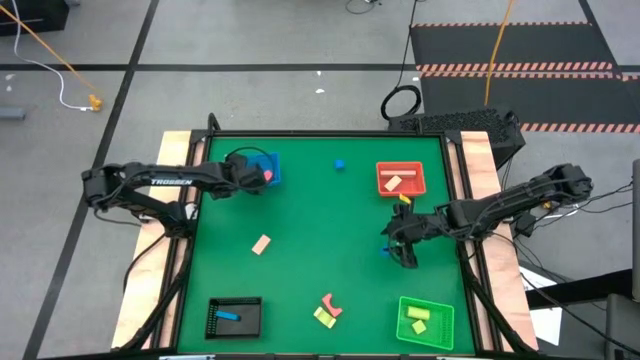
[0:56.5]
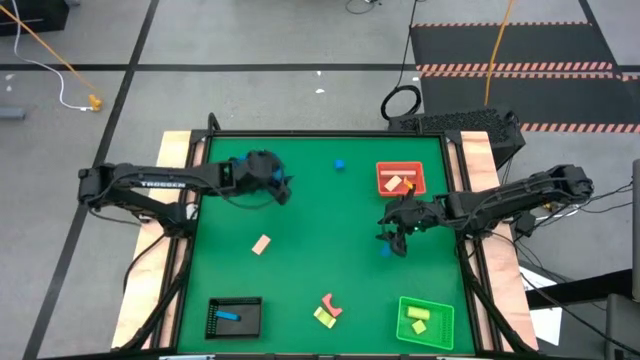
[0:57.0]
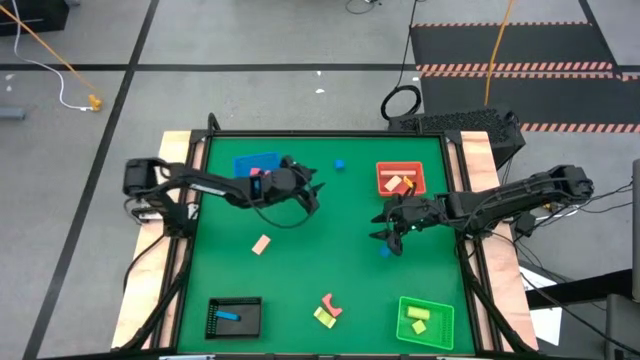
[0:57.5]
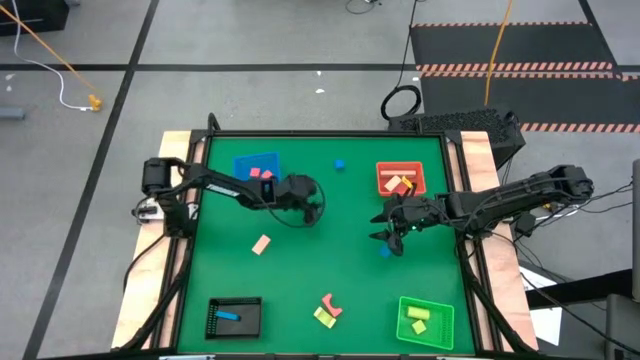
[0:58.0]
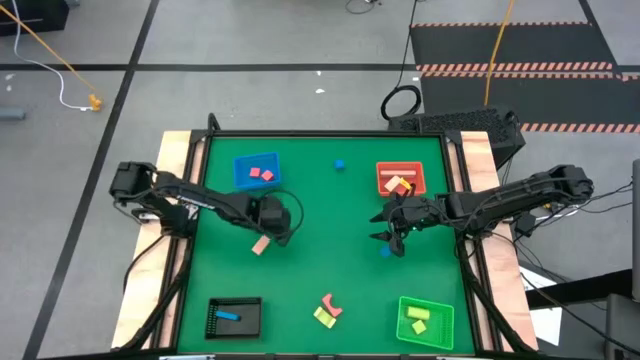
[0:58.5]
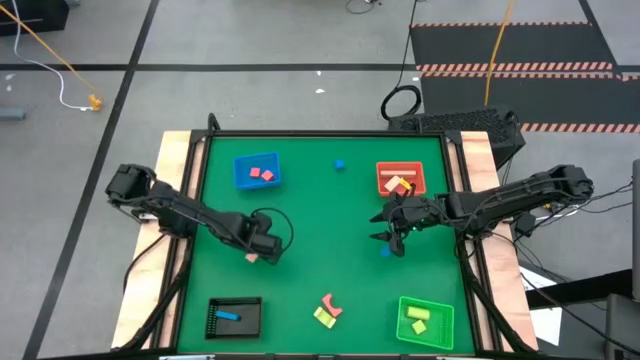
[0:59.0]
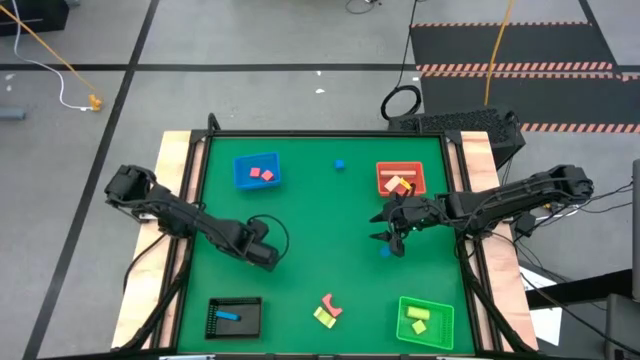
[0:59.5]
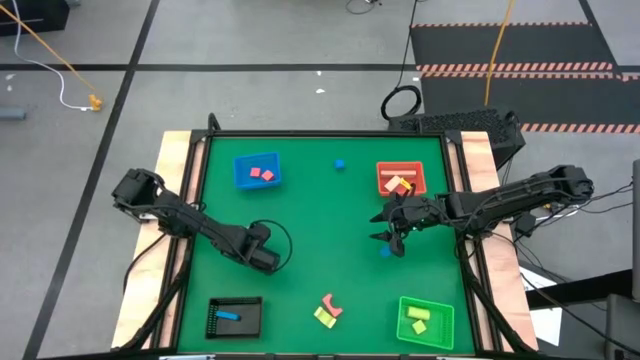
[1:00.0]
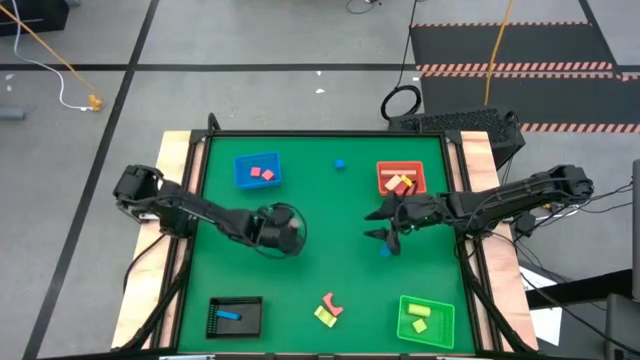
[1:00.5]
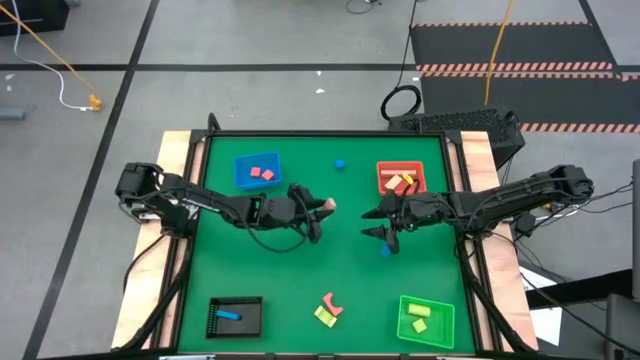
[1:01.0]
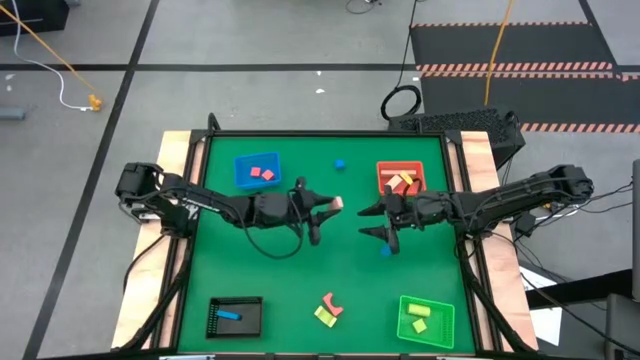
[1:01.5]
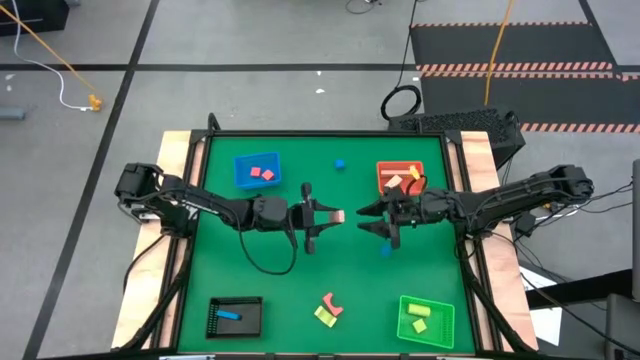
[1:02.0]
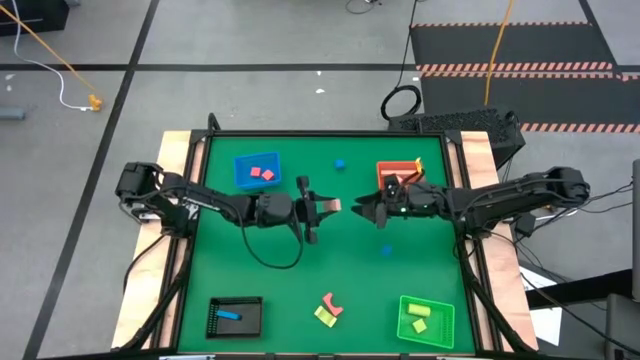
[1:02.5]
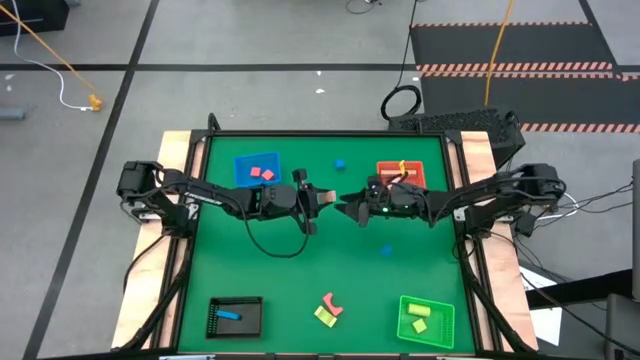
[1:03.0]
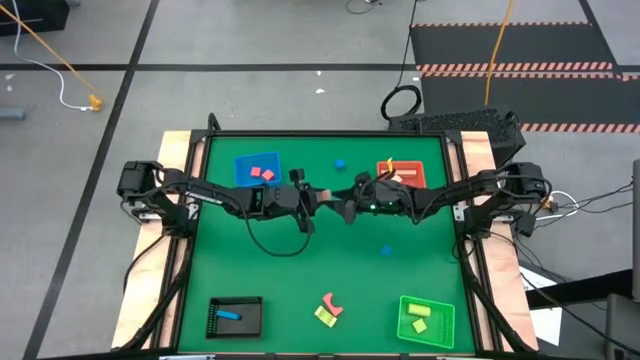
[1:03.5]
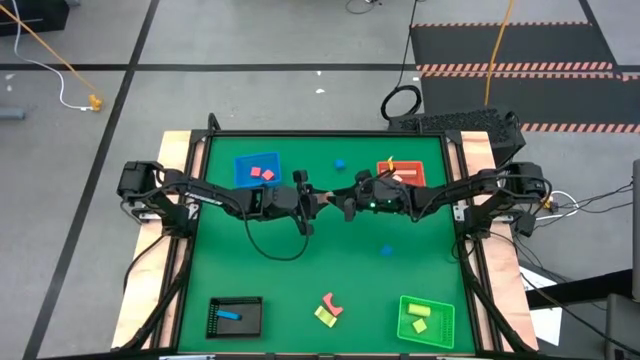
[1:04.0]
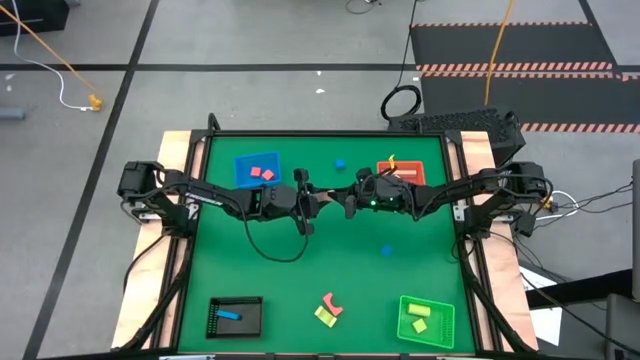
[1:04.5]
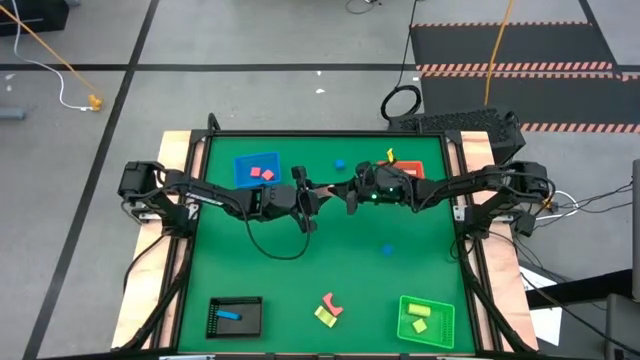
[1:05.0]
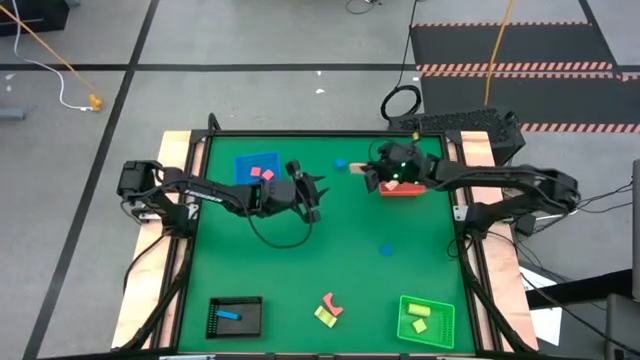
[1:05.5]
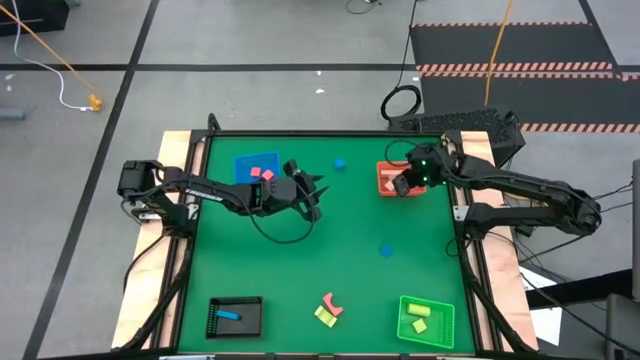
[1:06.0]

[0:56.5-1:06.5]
Task: Sort & place blocks by color
Put the brown block in the orange basket

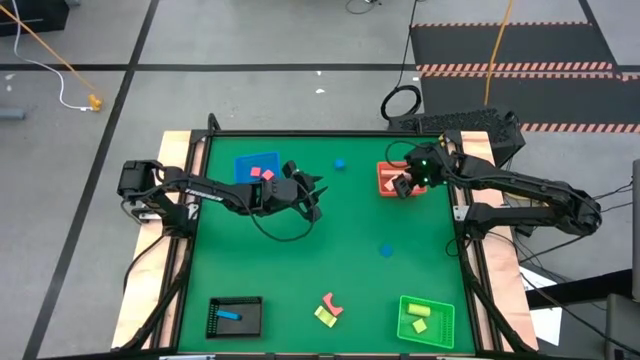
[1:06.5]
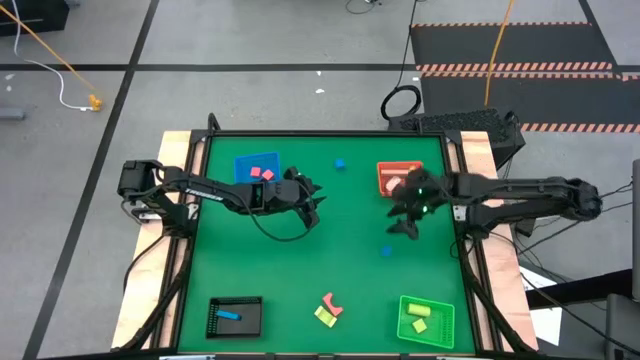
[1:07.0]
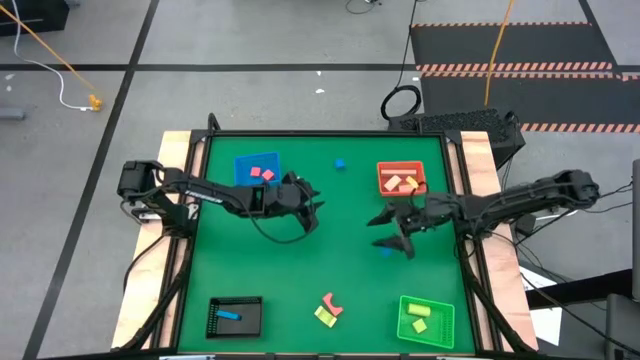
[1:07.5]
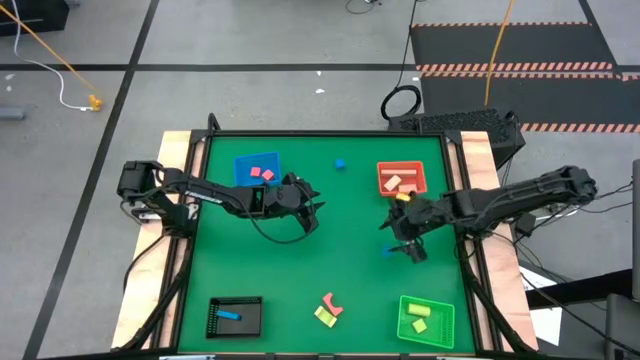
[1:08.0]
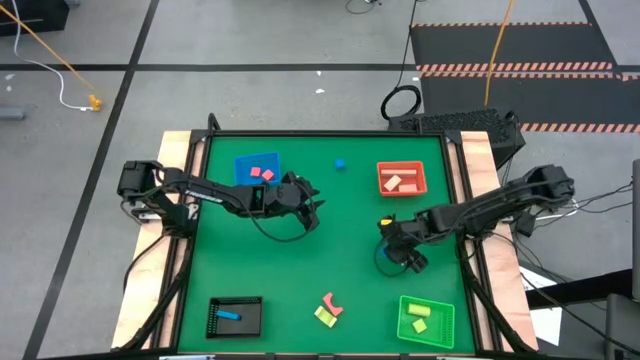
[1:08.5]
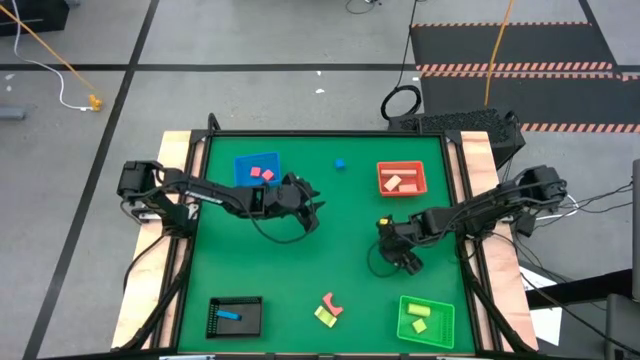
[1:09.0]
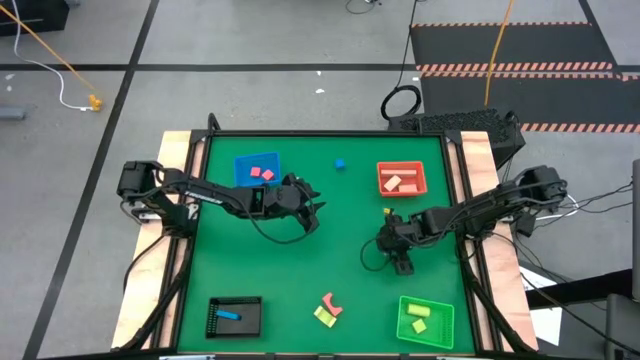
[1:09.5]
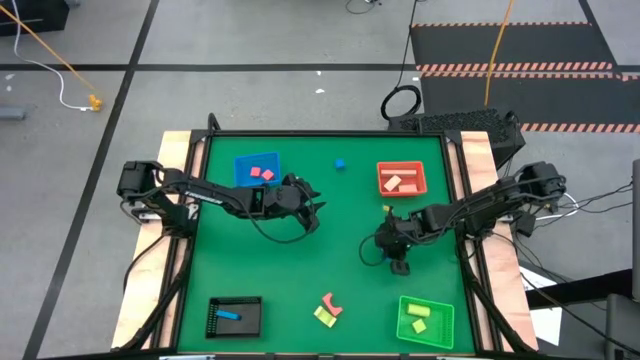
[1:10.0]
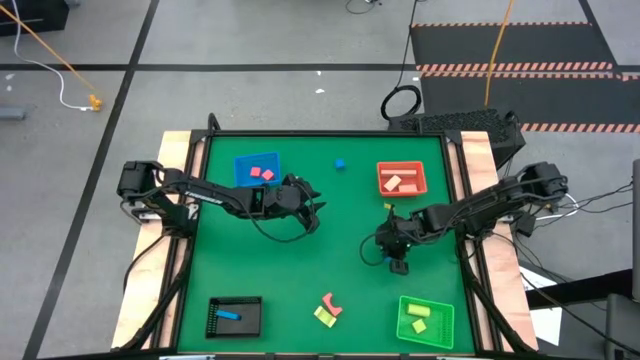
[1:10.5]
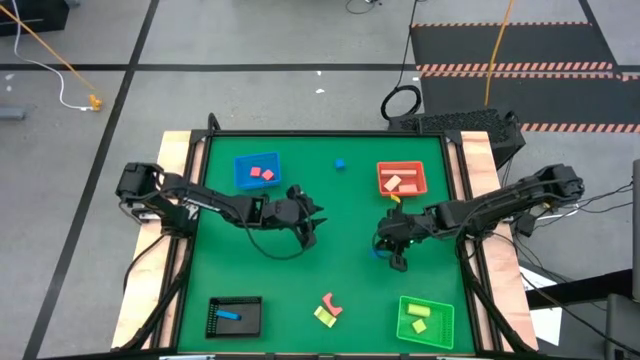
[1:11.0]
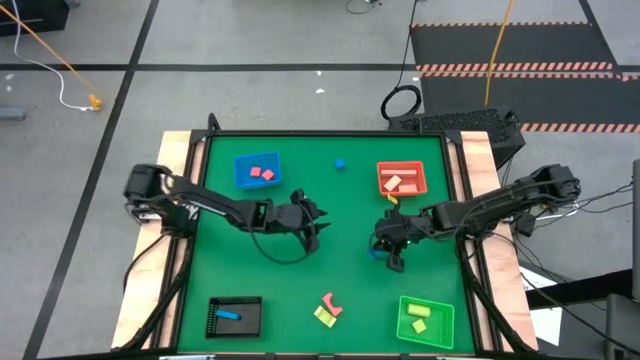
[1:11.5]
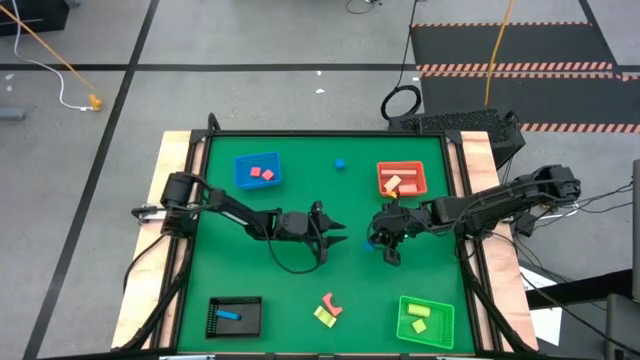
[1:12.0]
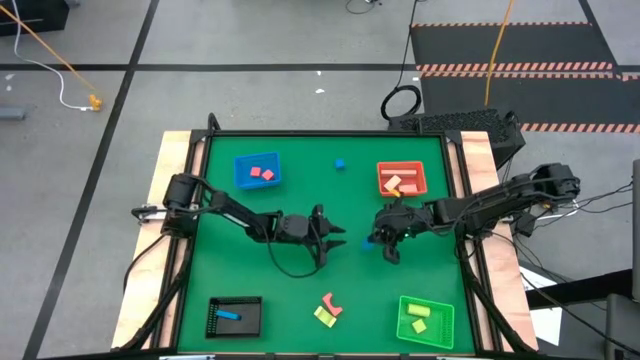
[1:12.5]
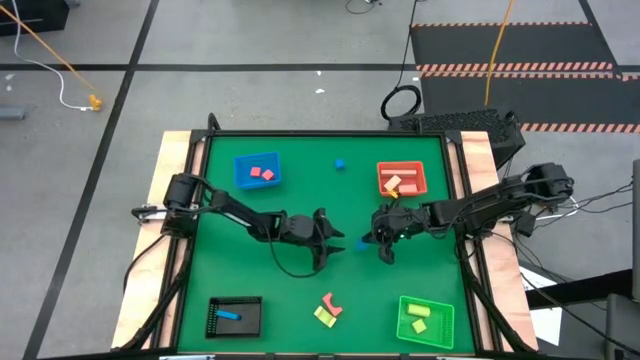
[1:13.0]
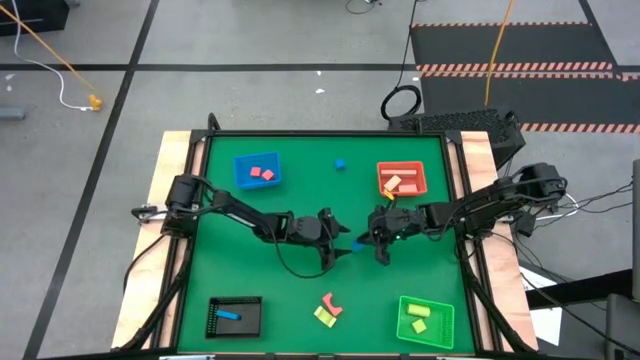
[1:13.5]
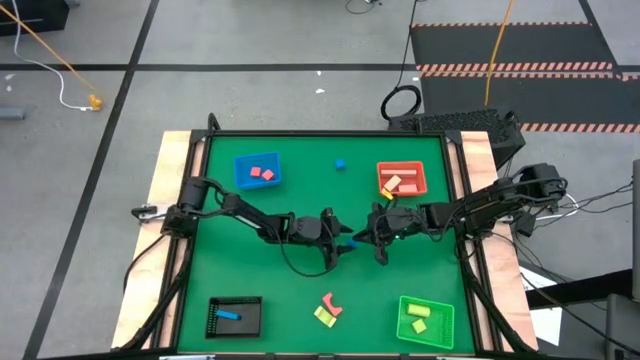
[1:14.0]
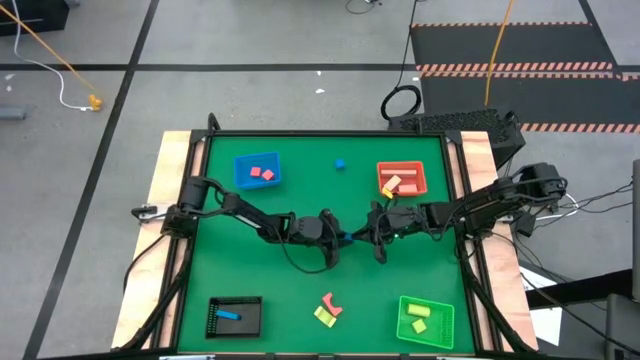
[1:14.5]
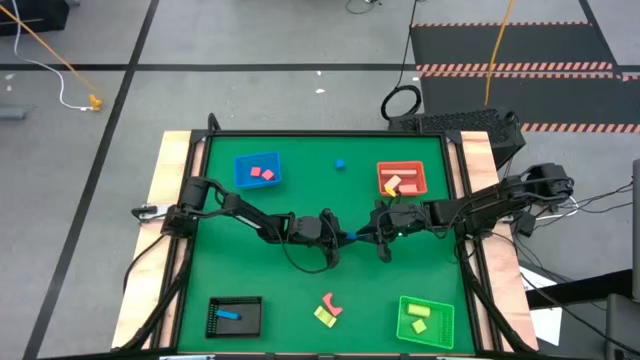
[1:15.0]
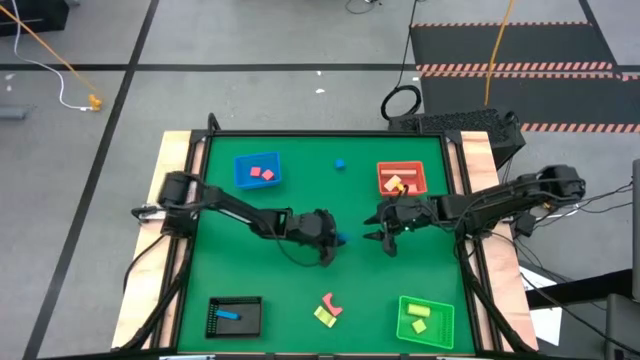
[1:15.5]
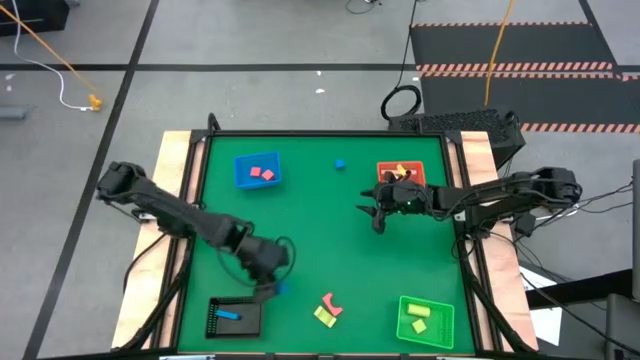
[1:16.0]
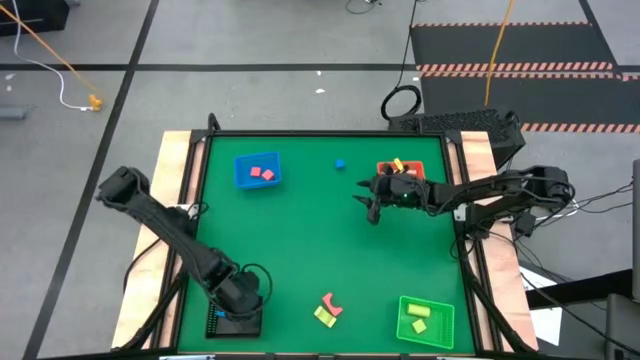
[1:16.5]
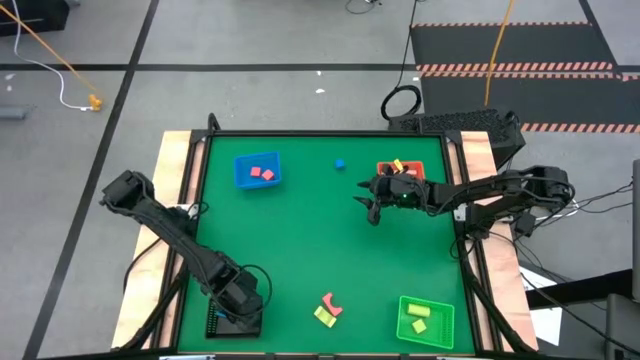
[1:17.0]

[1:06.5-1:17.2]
Put the bottom blue block in the black basket
